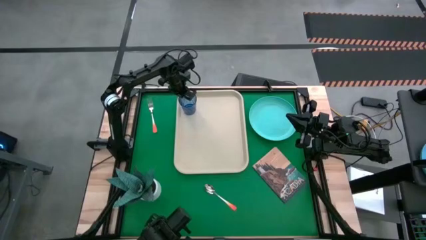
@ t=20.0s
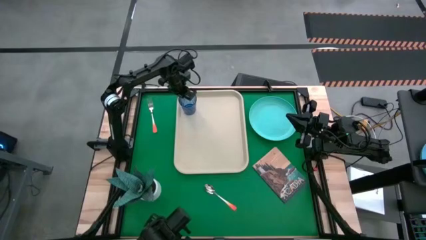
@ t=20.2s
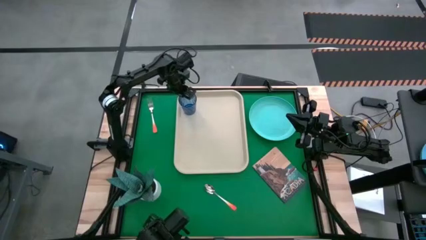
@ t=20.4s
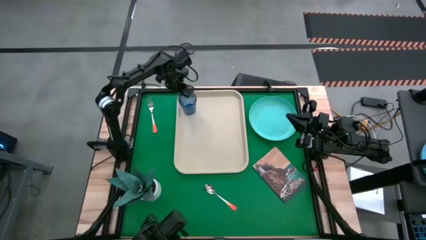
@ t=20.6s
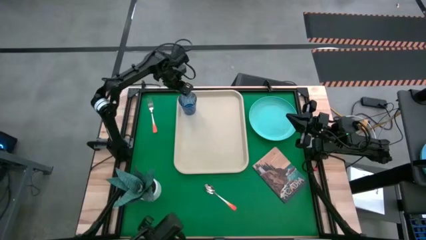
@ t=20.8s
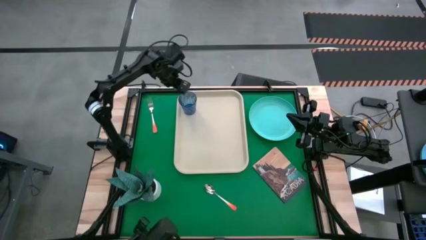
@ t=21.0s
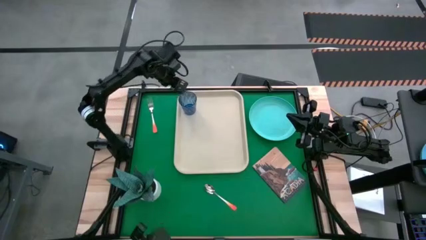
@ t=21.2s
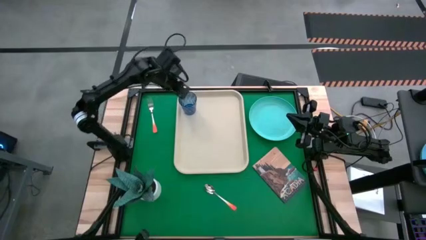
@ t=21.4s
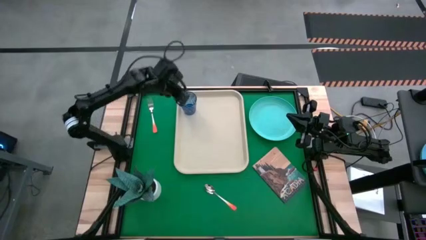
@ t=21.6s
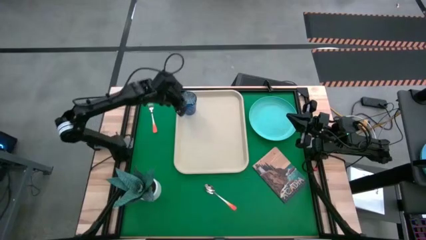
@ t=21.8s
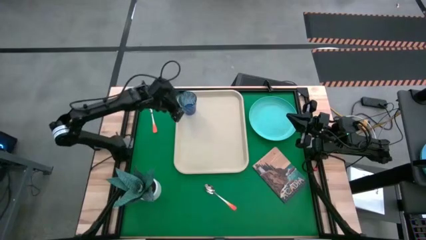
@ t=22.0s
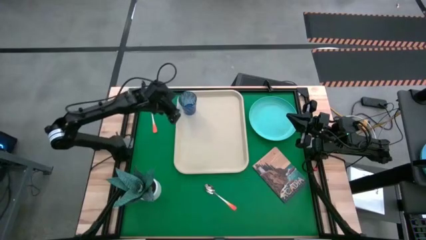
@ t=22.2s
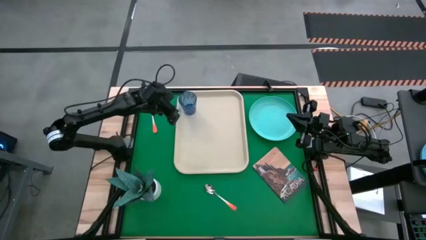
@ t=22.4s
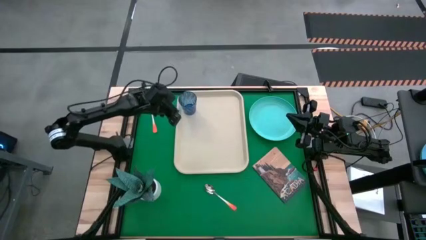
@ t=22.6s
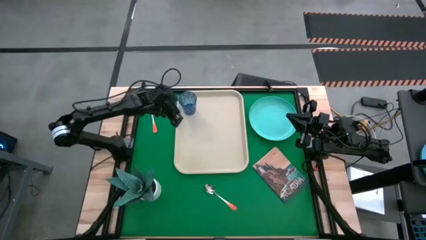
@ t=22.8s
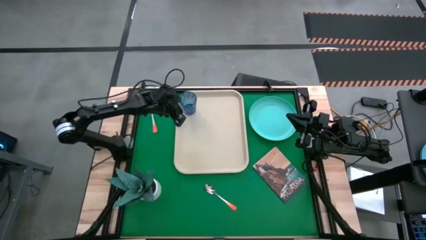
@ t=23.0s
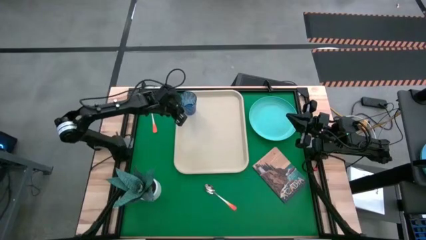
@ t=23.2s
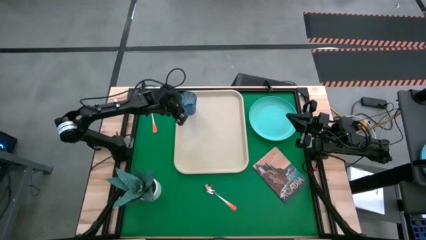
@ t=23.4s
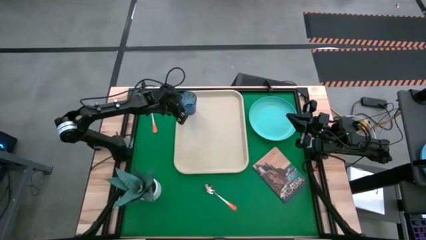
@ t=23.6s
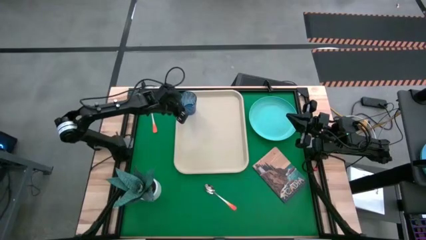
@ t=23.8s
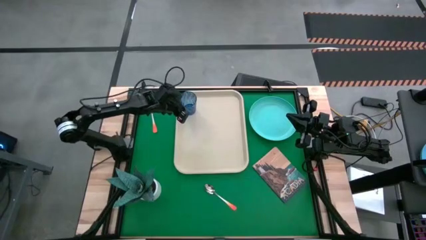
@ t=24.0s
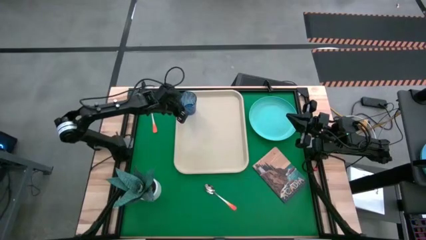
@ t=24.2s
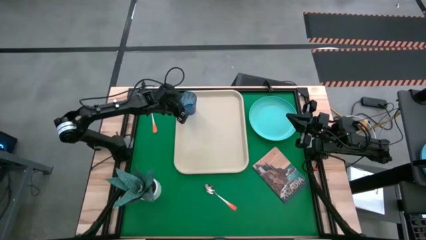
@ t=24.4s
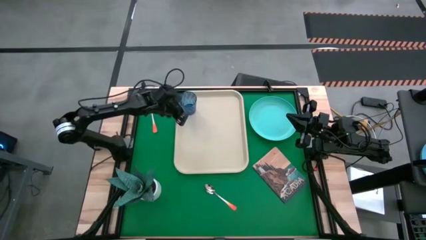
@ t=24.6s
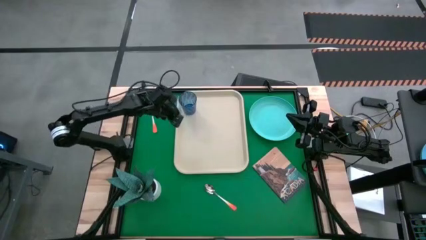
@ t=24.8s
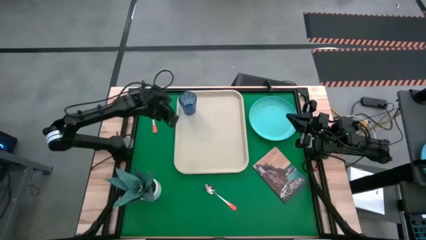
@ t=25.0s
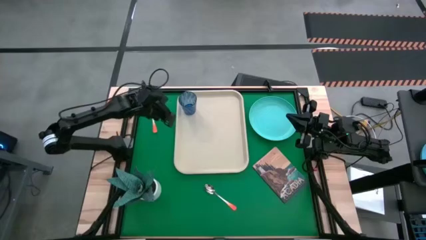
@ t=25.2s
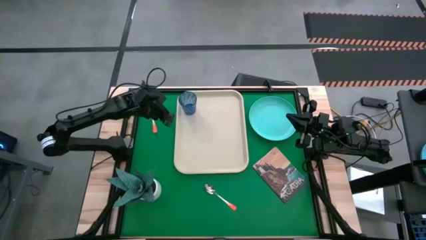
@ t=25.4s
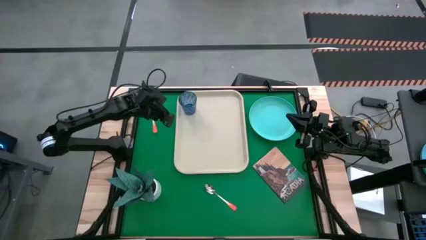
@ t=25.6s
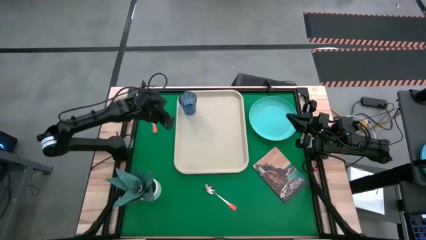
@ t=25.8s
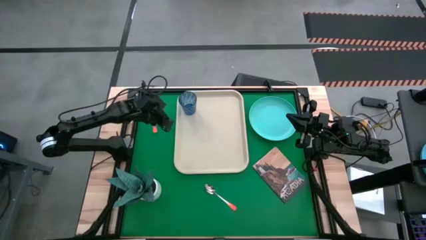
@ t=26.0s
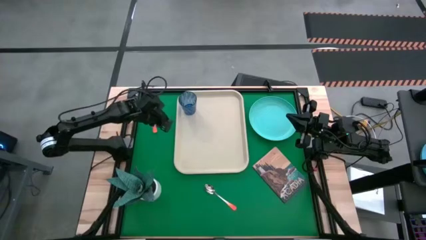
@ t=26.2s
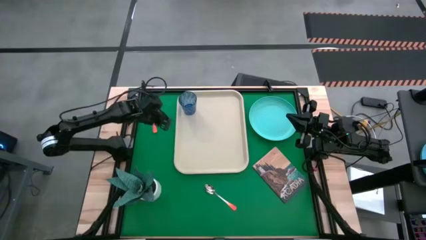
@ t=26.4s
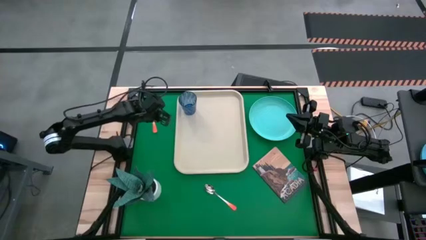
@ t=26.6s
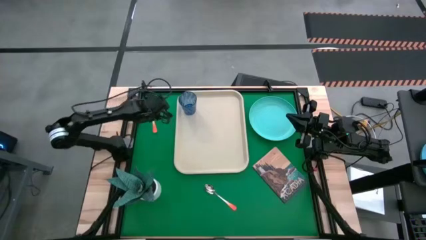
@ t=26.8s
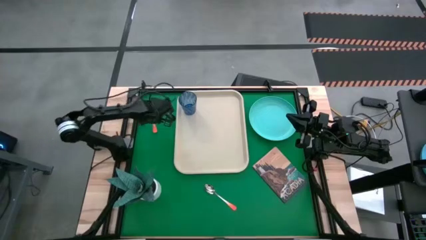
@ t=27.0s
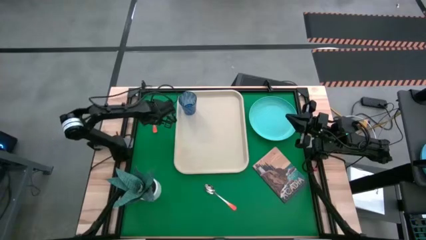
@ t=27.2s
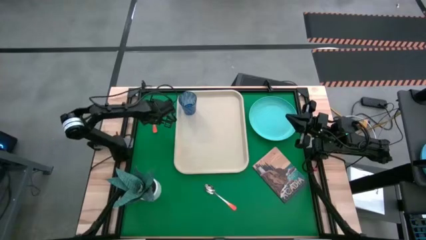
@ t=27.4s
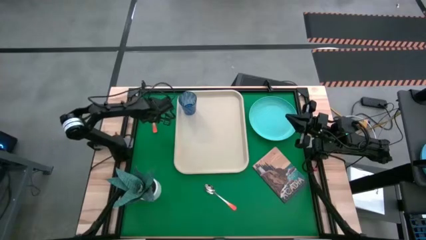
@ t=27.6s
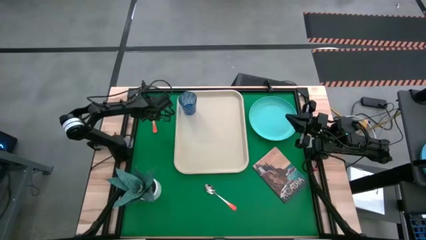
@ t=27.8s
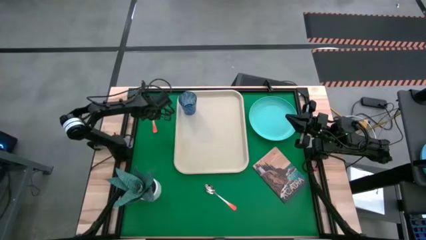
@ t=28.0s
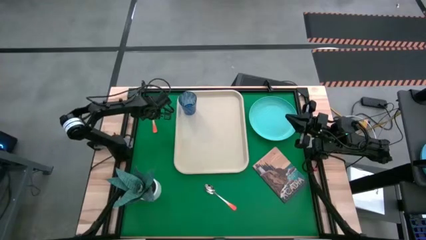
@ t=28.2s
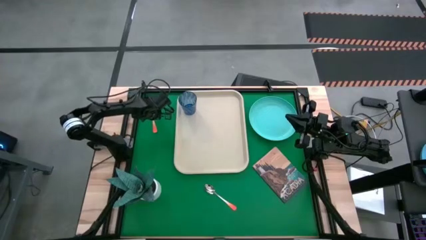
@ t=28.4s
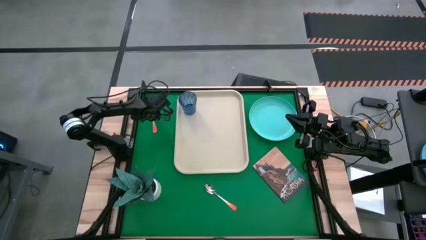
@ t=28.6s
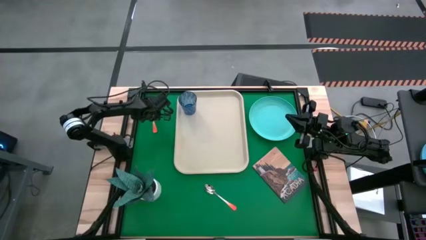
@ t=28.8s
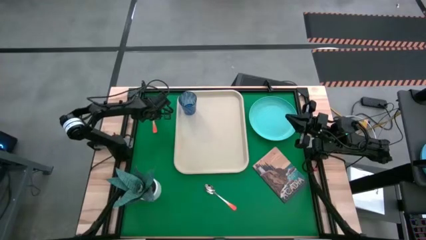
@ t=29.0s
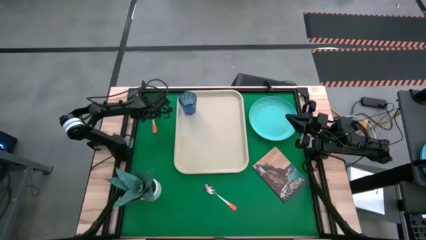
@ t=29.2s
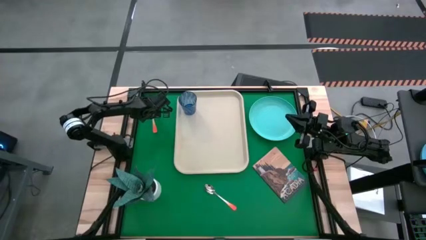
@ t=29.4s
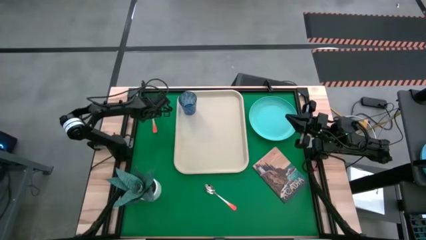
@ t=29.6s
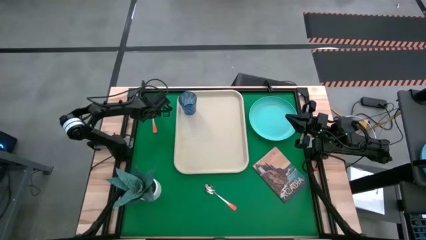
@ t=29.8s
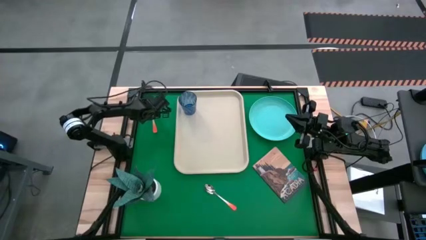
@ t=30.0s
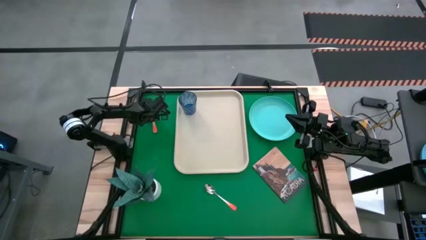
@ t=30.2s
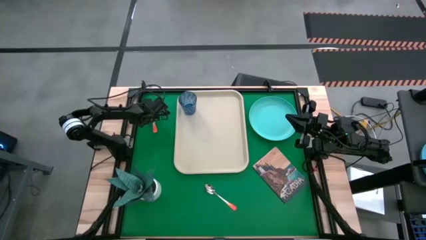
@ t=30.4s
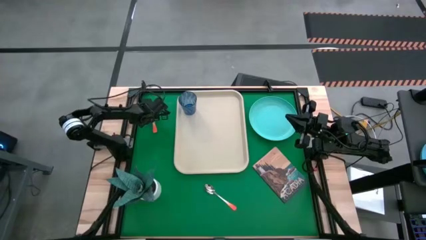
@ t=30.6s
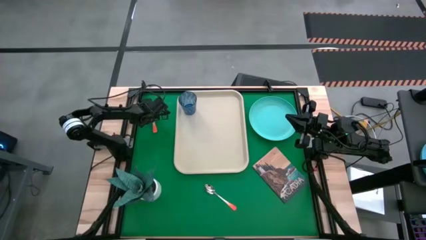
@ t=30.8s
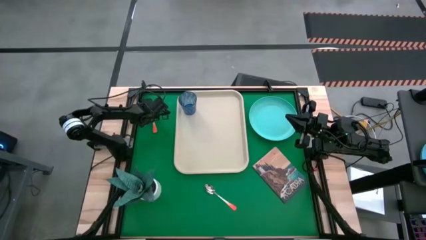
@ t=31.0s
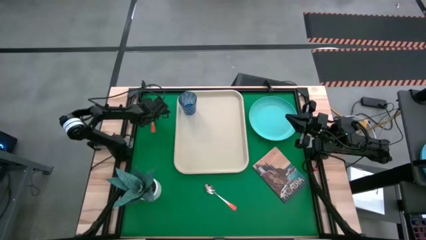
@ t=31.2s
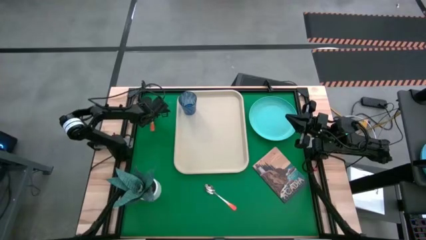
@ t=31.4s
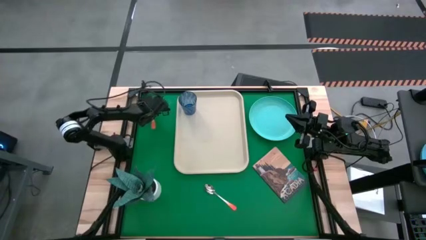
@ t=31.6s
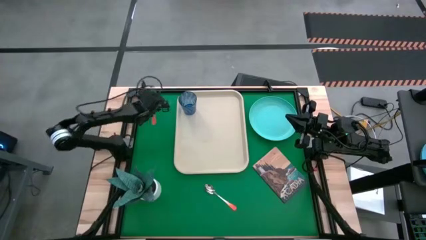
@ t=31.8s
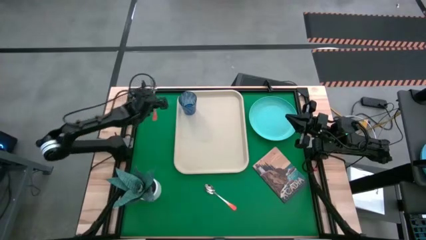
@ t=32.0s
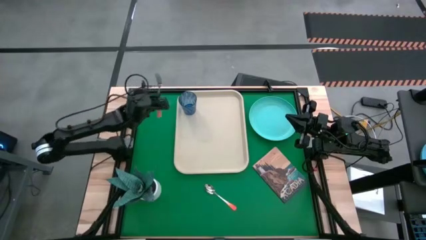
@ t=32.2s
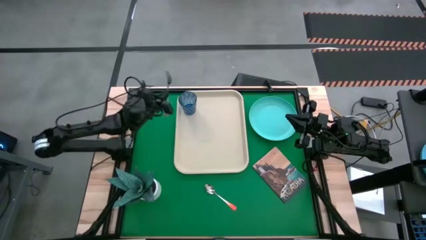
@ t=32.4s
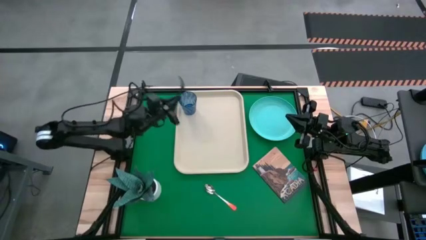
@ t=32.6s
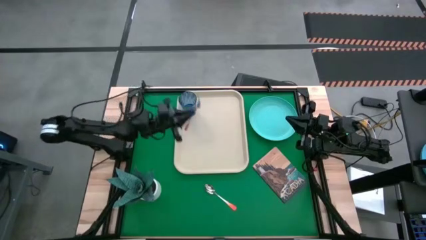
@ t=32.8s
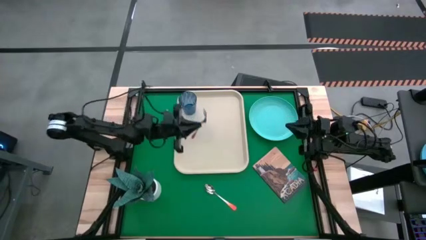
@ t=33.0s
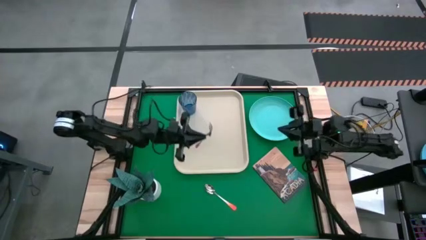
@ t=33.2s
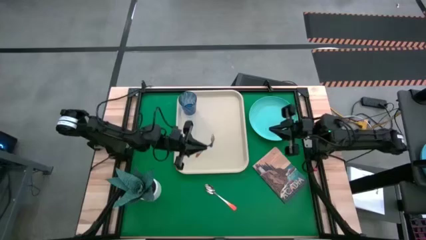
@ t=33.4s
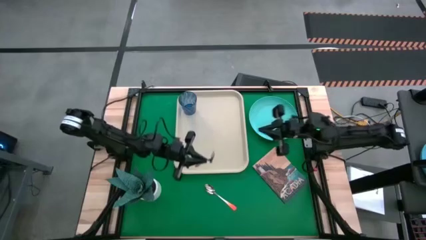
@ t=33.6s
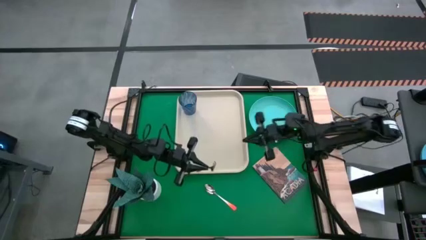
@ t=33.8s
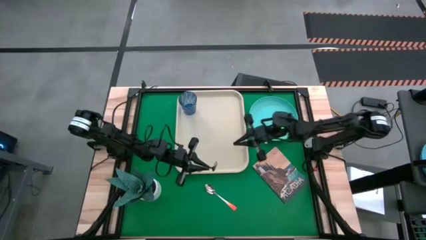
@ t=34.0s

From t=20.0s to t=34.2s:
Task: Pick and place plate/cup/fork/spoon on tray
Put the orange fork on the left of the white serving tray
